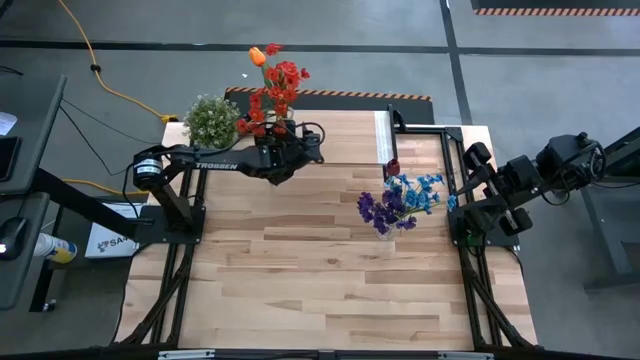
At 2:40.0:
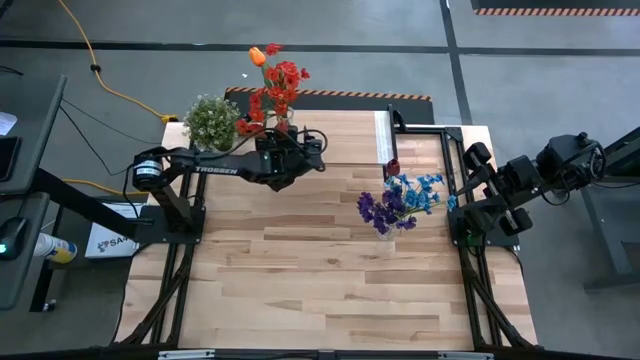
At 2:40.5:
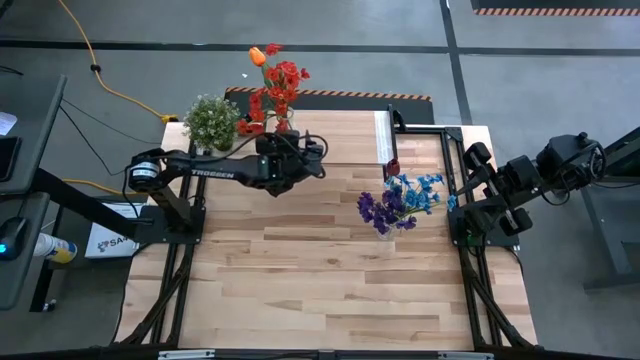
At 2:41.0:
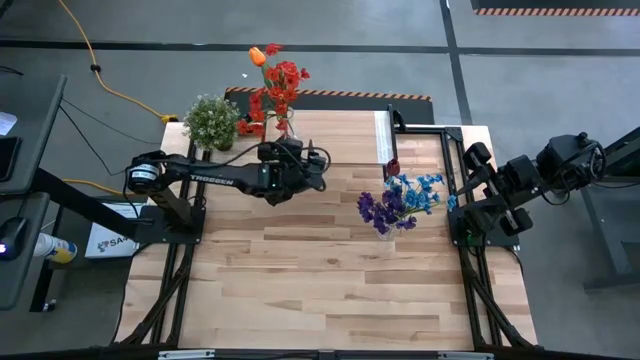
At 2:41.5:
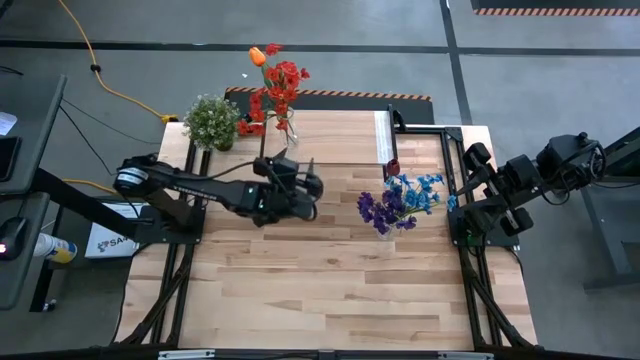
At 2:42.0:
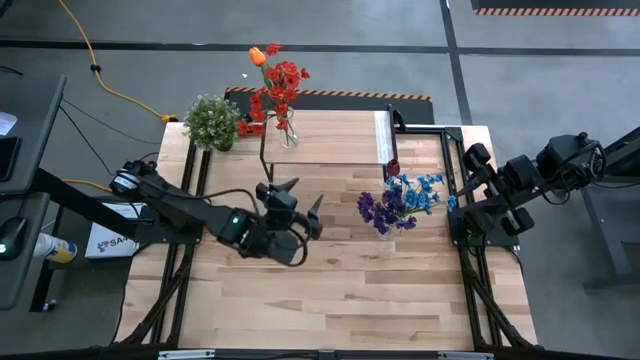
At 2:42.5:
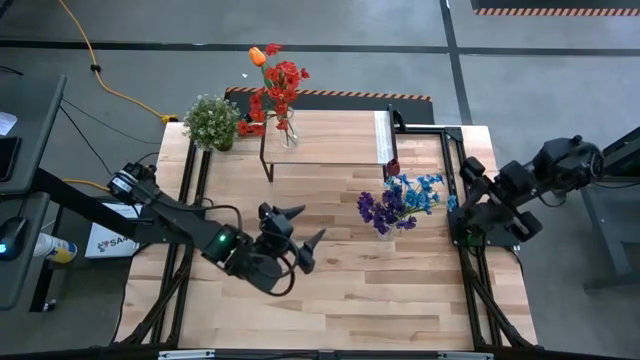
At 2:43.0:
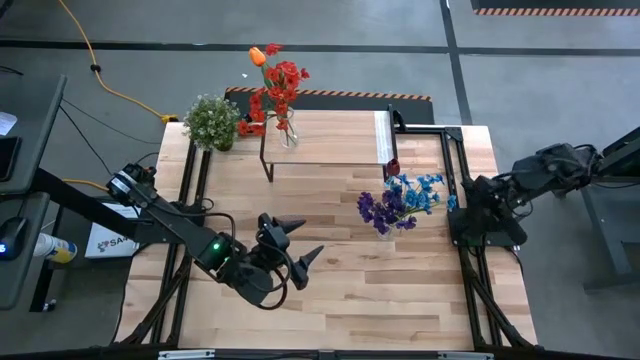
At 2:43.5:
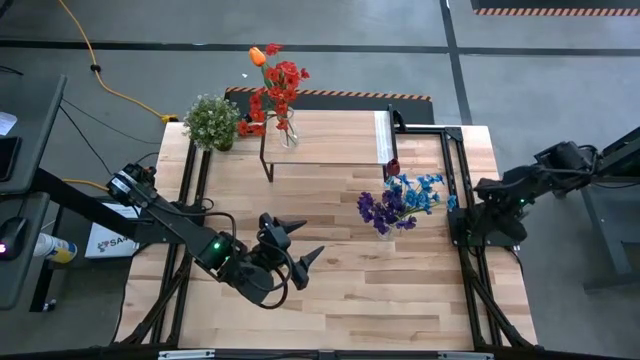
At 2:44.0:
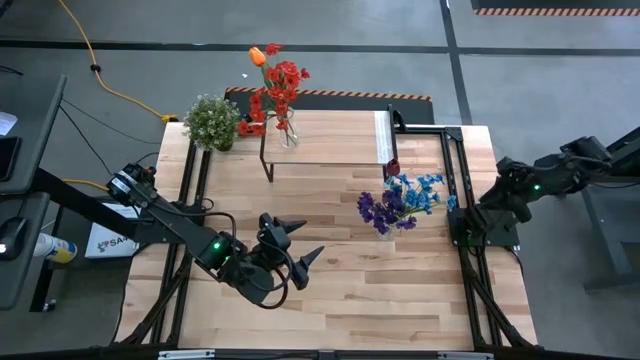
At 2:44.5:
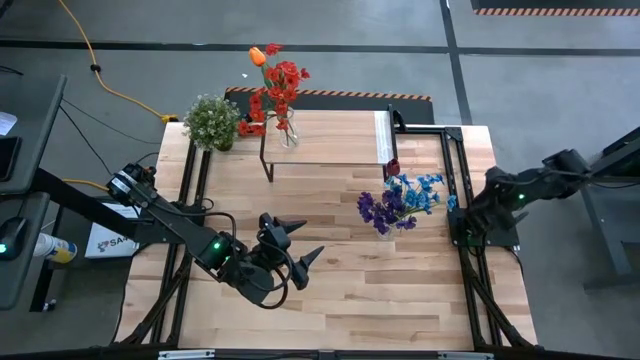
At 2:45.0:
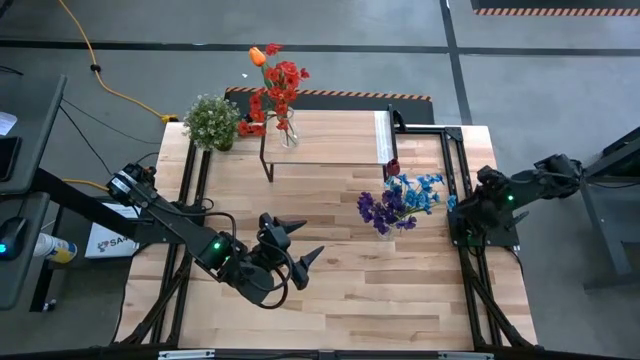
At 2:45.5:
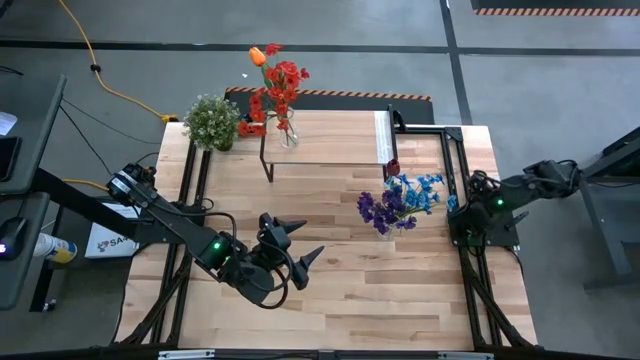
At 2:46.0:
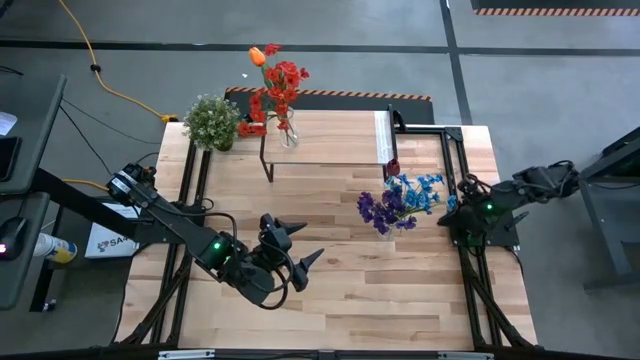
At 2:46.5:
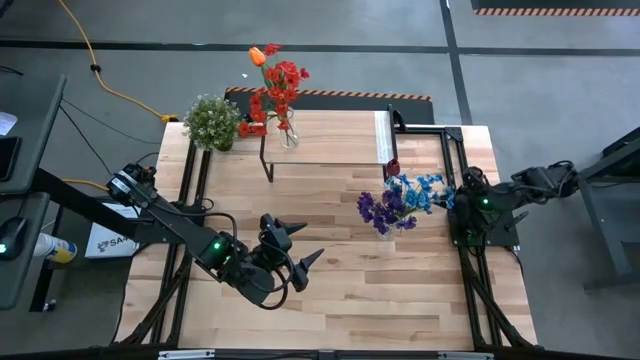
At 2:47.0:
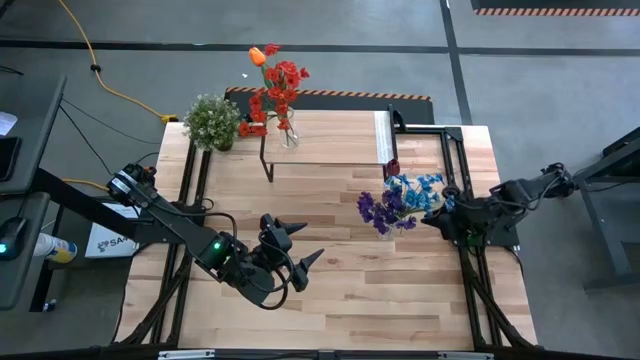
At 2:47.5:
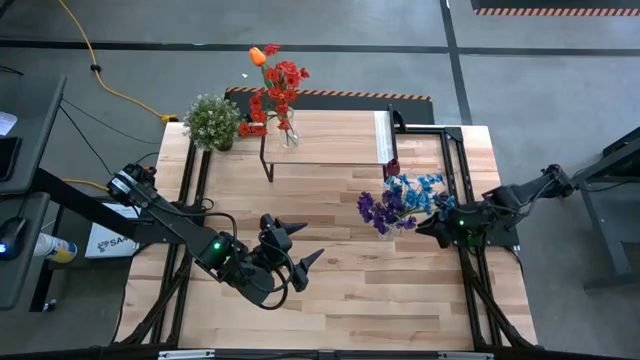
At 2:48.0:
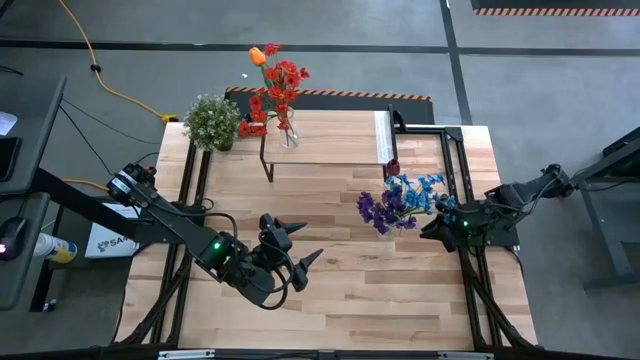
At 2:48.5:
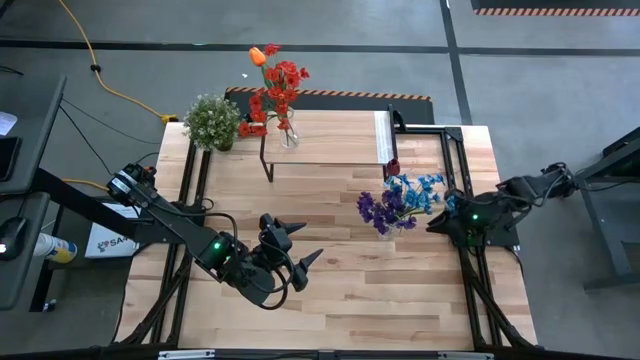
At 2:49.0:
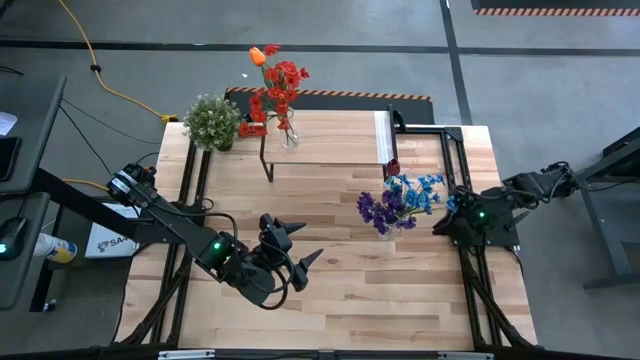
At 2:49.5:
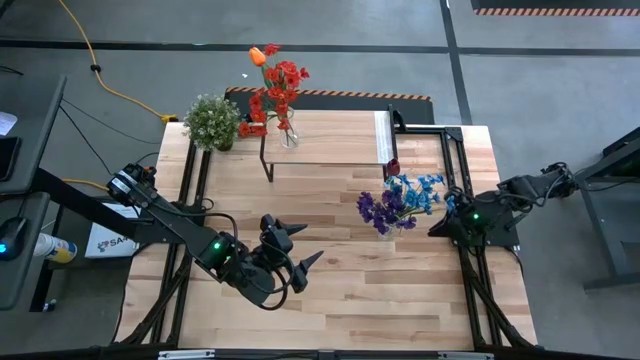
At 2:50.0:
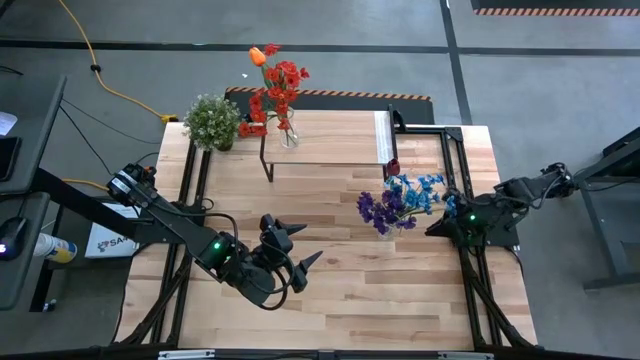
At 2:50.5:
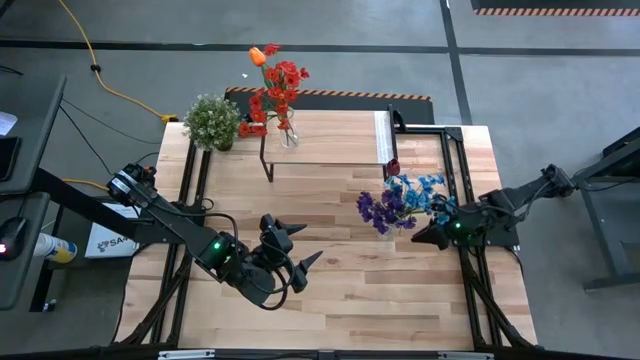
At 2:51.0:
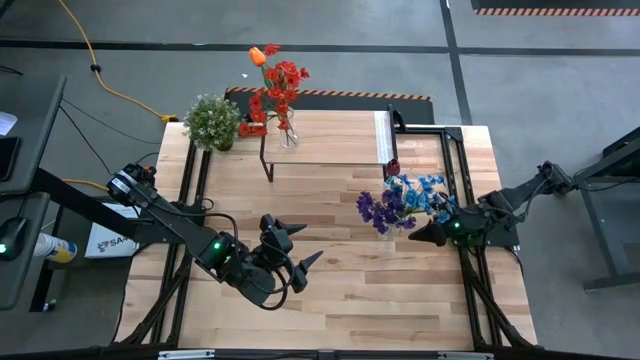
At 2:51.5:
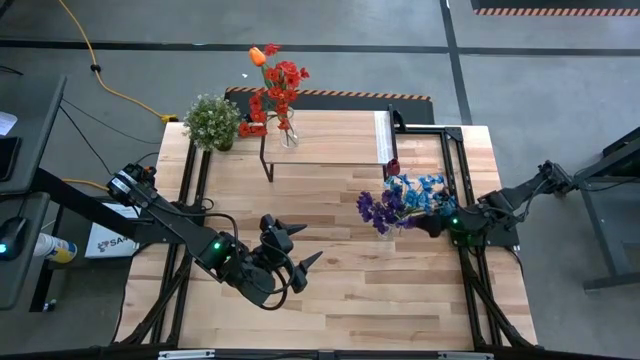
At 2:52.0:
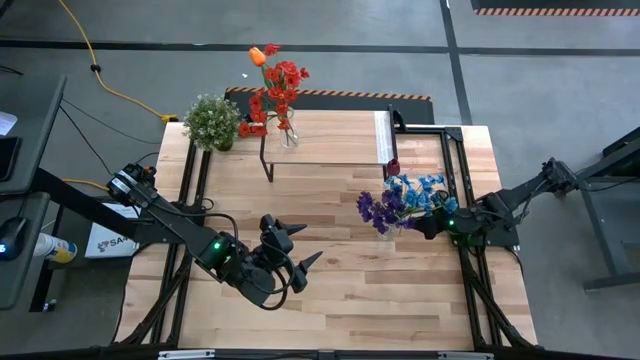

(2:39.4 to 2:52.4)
Task: Pick and place flowers into a vace then onto a shelf
Put the right transparent vase on the shelf

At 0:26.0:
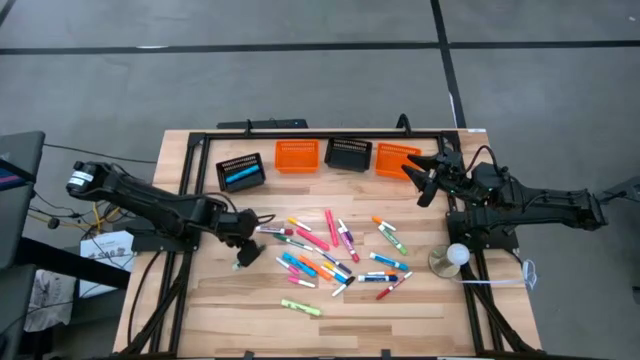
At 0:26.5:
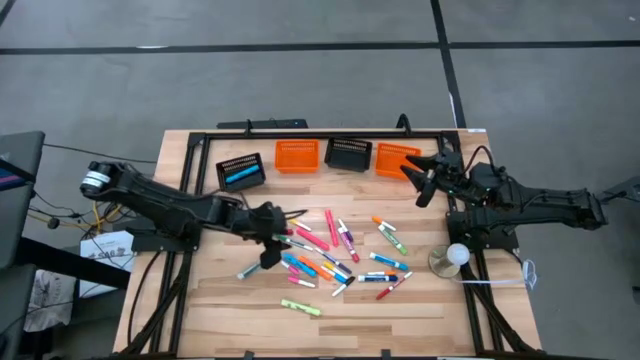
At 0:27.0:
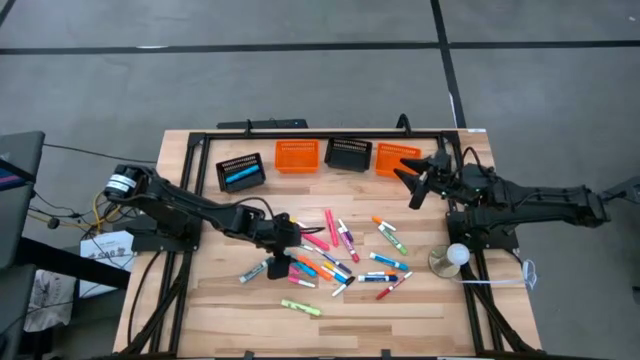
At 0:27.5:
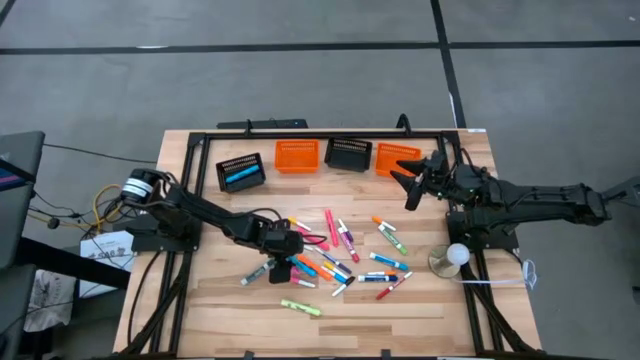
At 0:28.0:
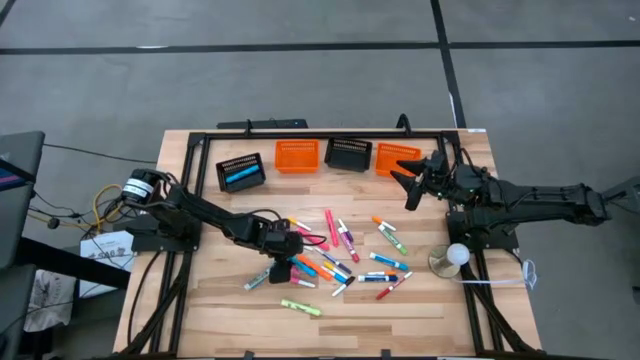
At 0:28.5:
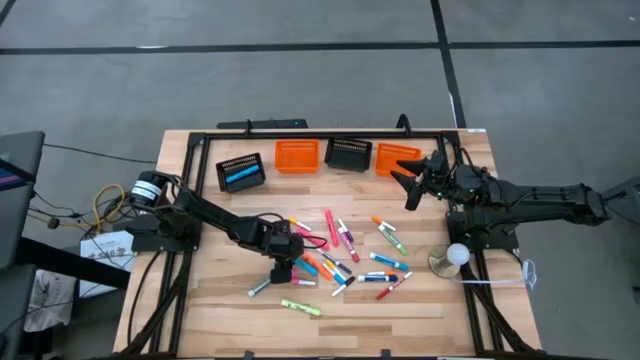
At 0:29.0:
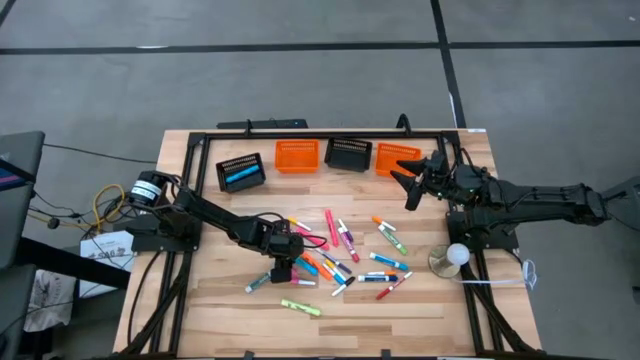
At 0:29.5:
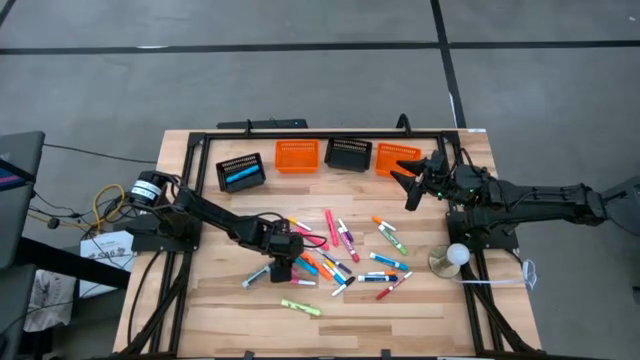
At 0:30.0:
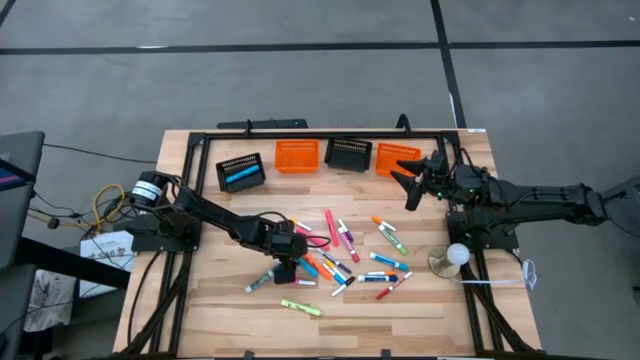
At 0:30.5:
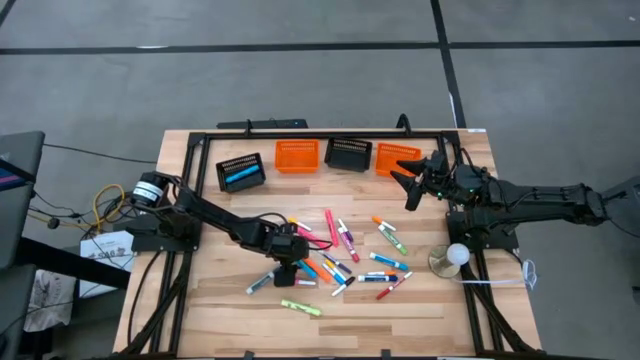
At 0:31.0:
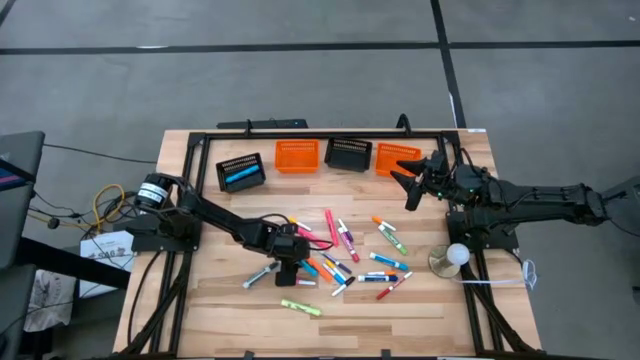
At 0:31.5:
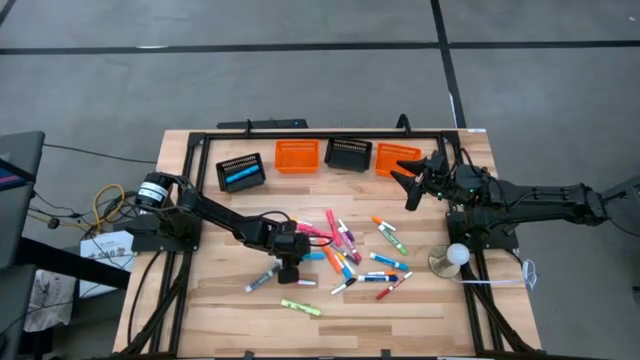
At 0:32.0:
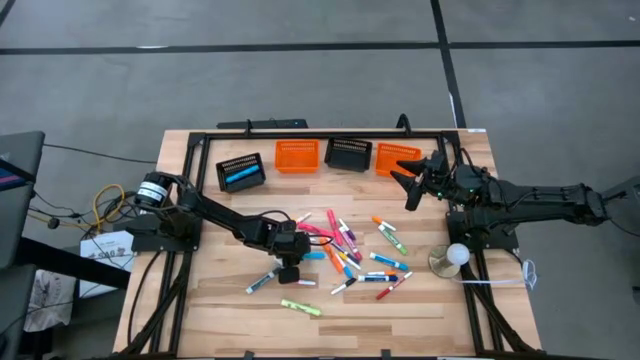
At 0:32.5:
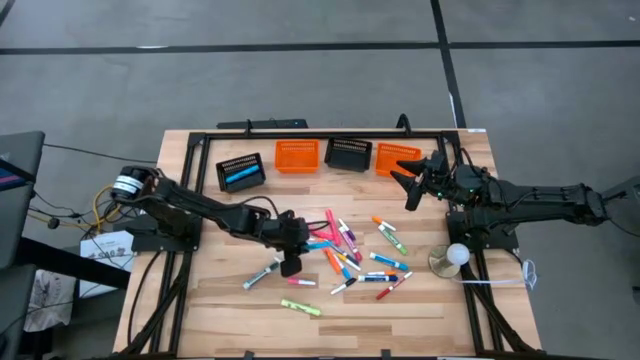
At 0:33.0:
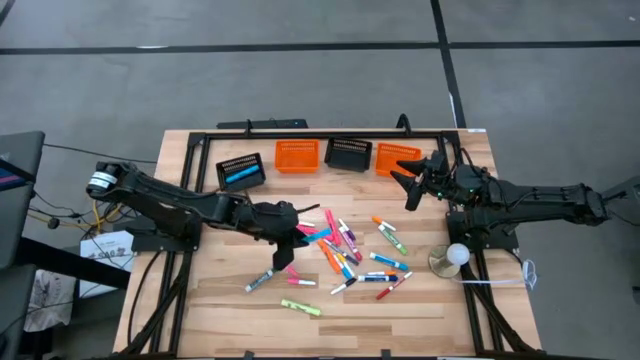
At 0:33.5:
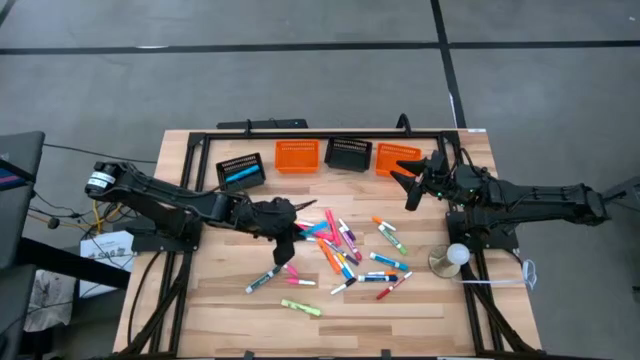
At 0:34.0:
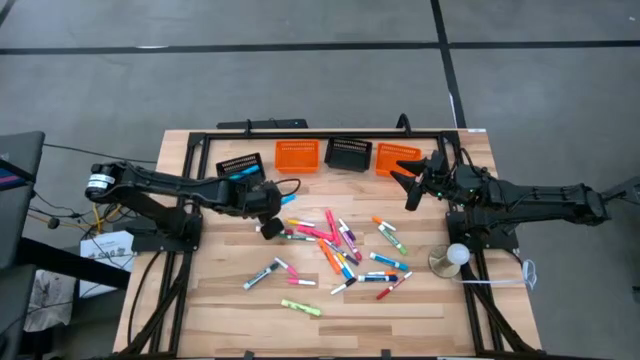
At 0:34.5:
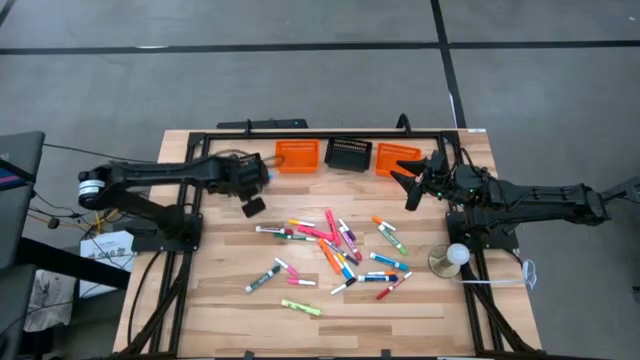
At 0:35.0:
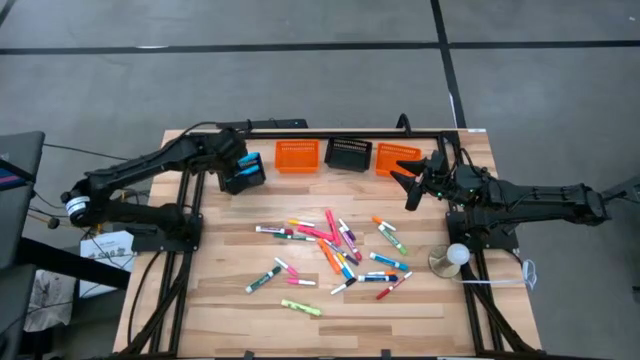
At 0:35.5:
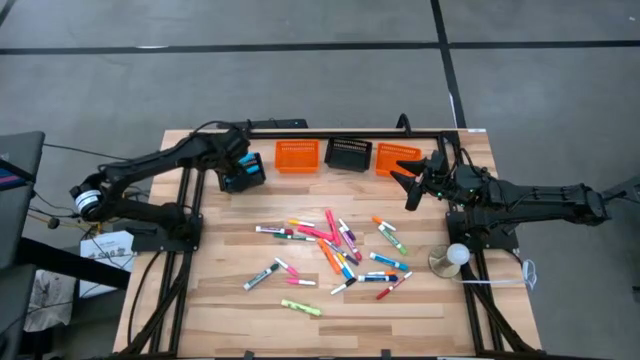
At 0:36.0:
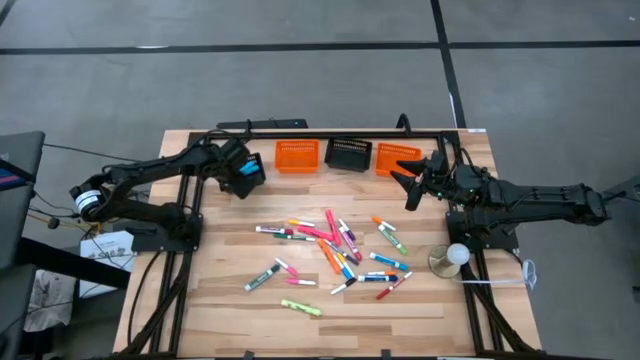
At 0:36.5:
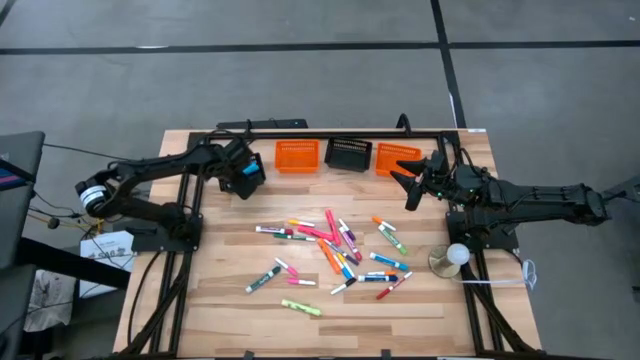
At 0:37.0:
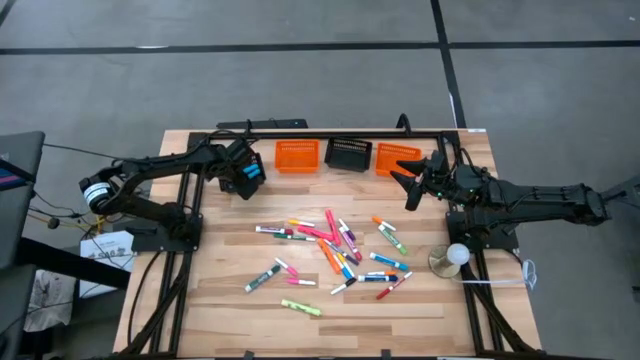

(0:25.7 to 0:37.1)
Task: Pick & Place Markers
Put the large light blue highlighter pen into the left black bin
